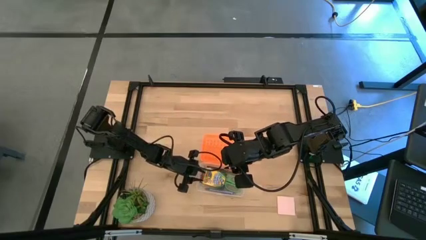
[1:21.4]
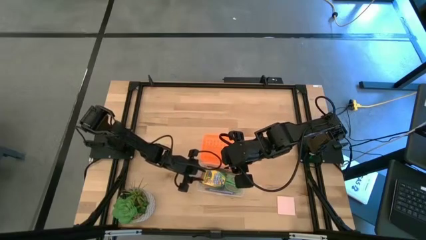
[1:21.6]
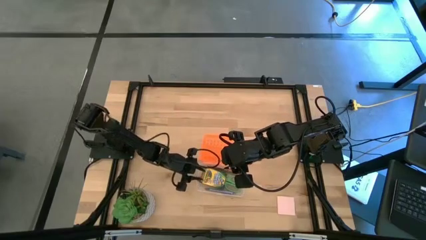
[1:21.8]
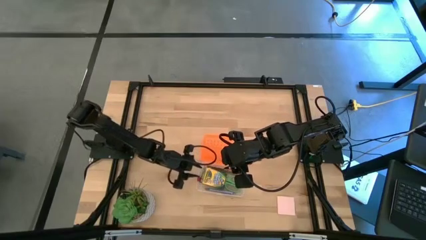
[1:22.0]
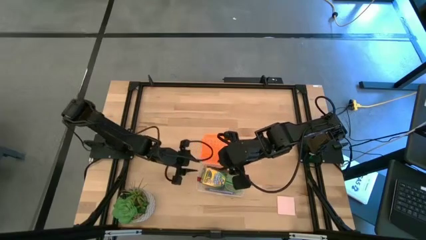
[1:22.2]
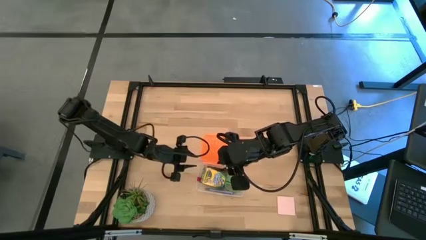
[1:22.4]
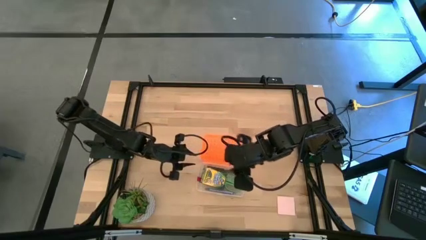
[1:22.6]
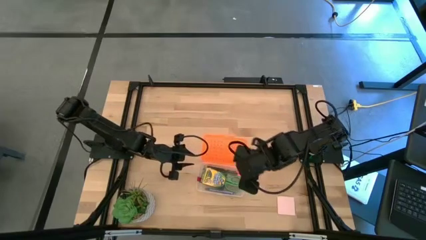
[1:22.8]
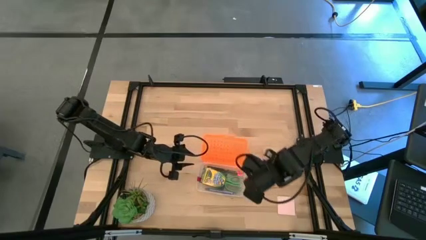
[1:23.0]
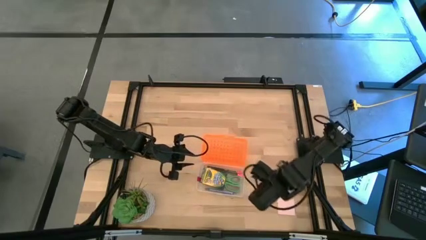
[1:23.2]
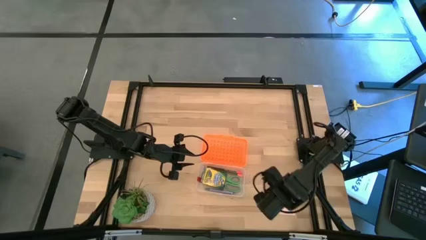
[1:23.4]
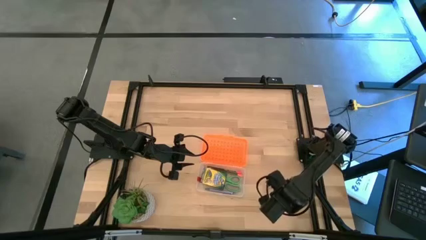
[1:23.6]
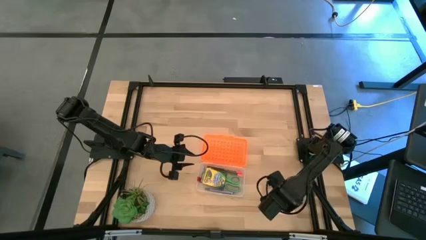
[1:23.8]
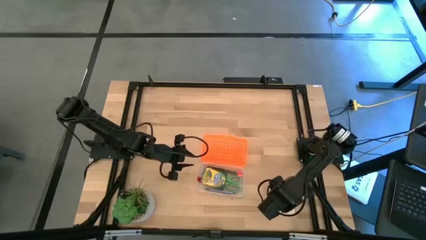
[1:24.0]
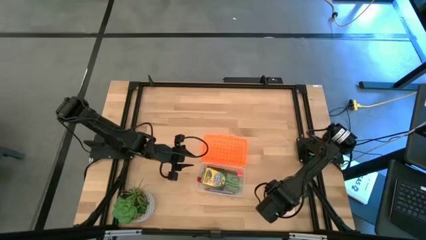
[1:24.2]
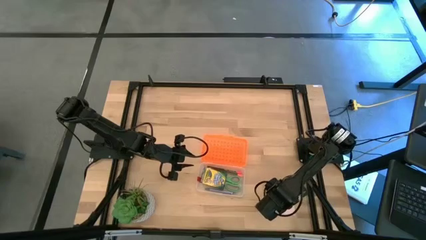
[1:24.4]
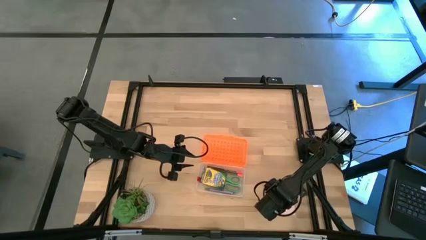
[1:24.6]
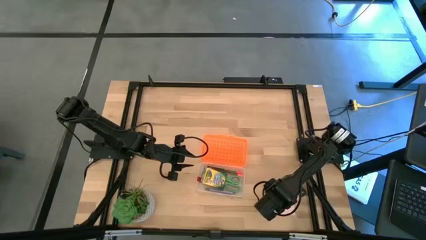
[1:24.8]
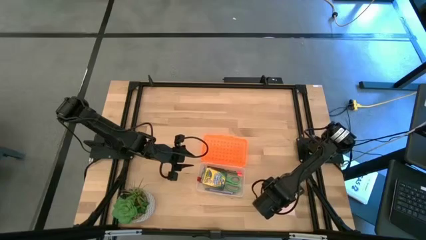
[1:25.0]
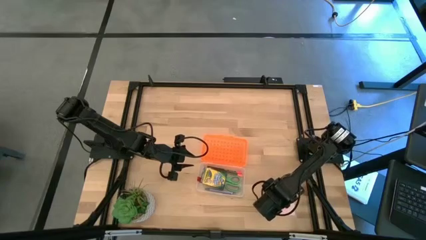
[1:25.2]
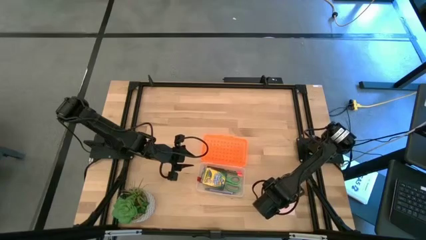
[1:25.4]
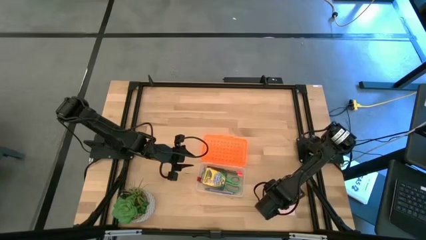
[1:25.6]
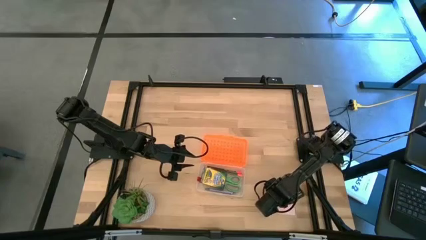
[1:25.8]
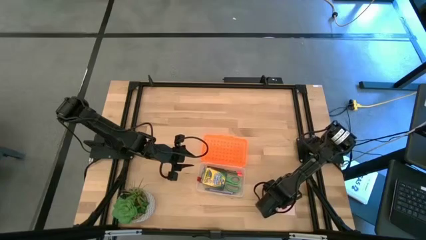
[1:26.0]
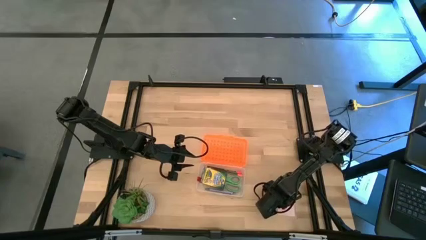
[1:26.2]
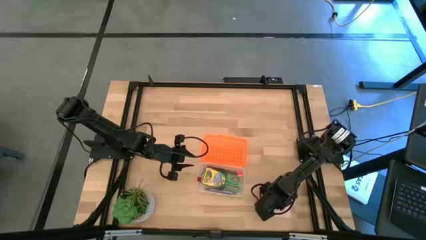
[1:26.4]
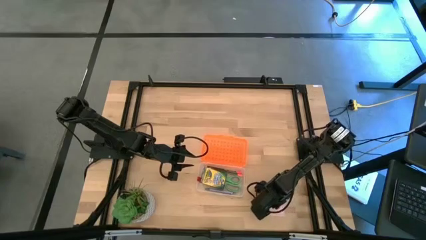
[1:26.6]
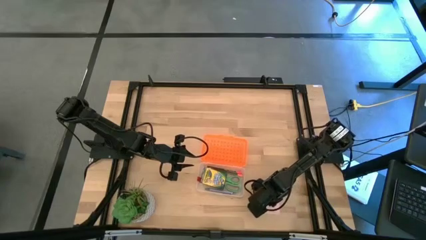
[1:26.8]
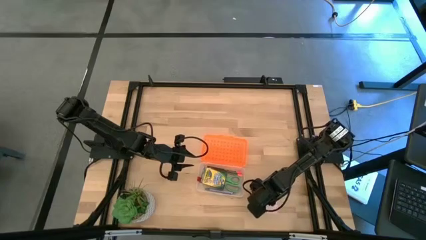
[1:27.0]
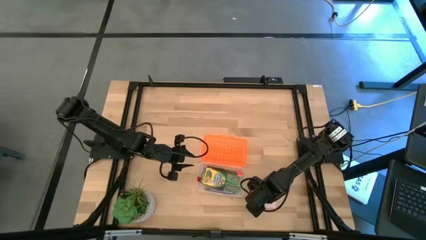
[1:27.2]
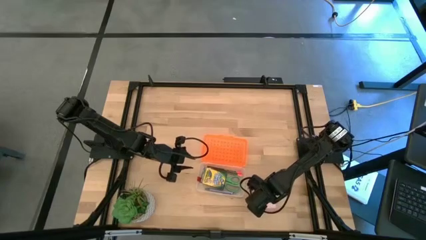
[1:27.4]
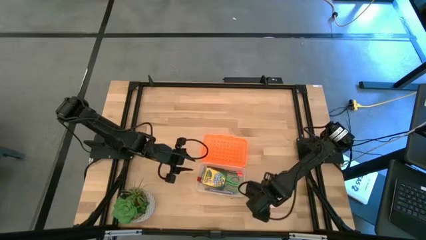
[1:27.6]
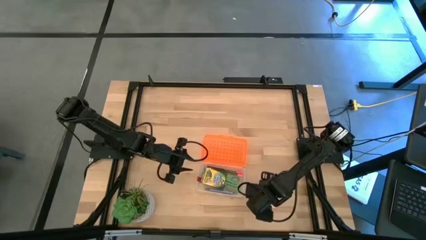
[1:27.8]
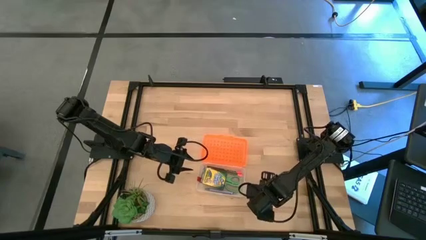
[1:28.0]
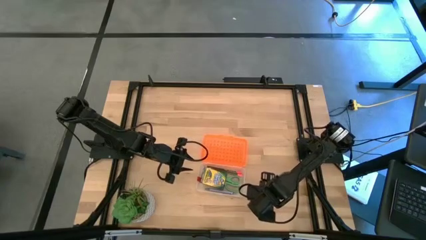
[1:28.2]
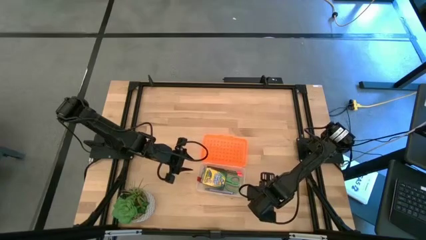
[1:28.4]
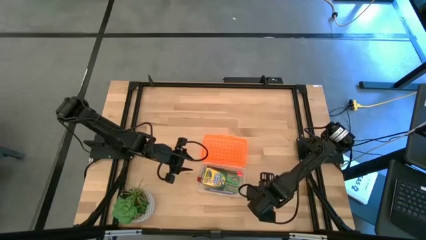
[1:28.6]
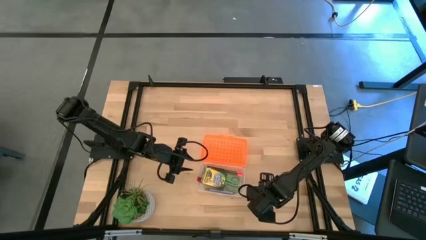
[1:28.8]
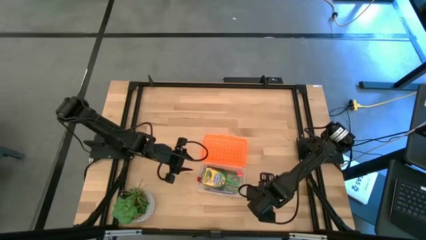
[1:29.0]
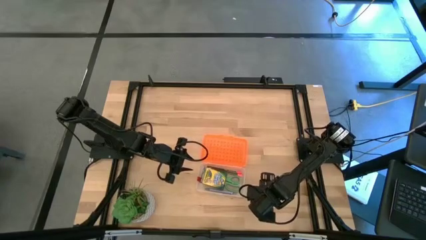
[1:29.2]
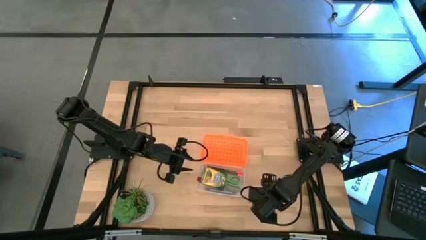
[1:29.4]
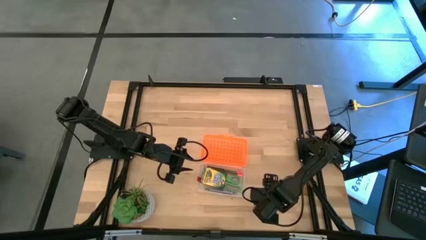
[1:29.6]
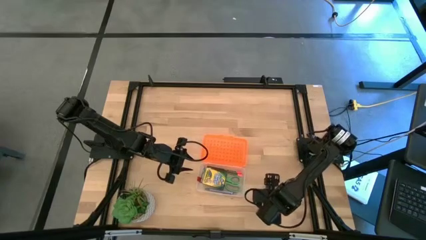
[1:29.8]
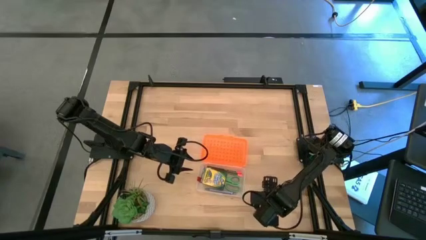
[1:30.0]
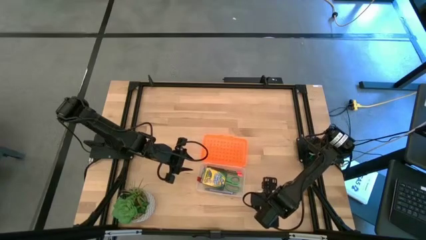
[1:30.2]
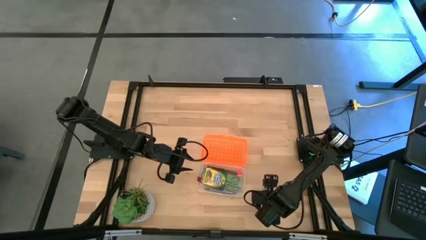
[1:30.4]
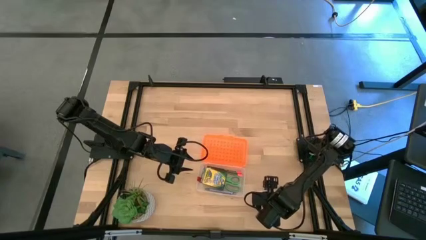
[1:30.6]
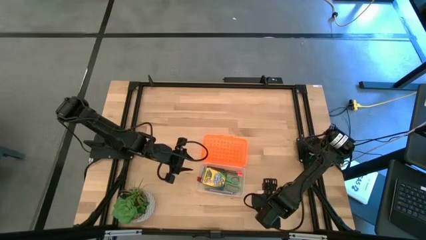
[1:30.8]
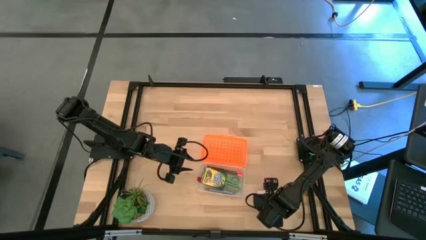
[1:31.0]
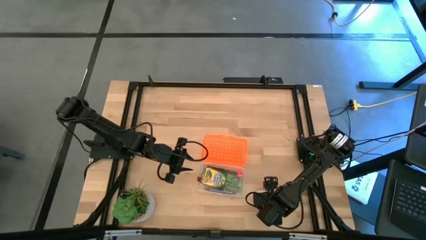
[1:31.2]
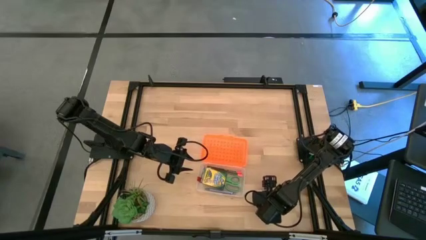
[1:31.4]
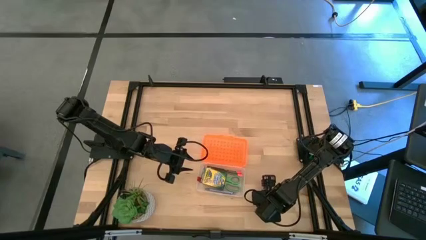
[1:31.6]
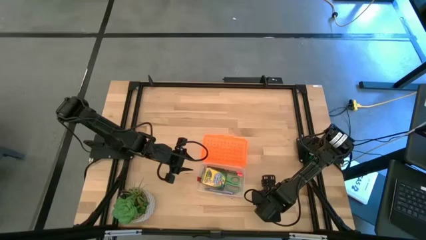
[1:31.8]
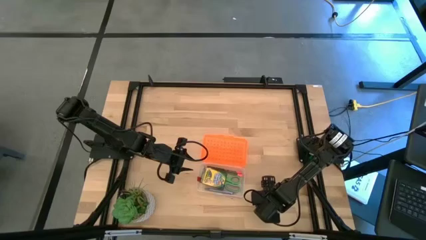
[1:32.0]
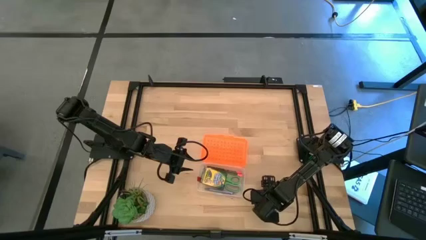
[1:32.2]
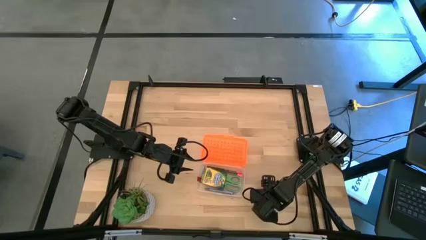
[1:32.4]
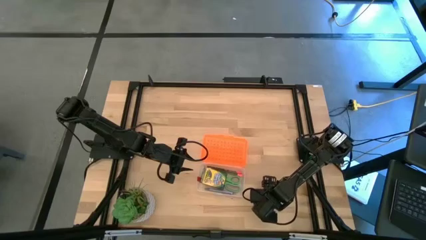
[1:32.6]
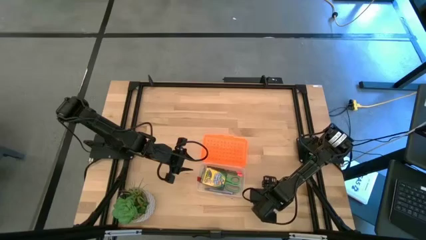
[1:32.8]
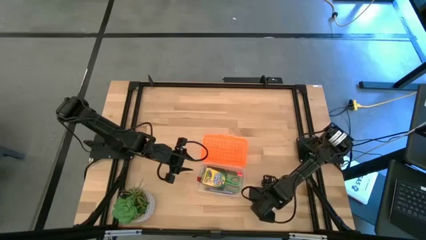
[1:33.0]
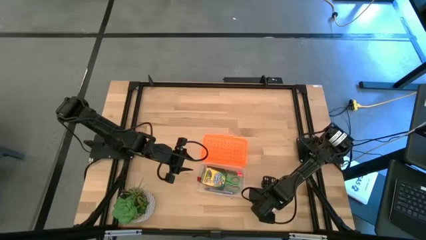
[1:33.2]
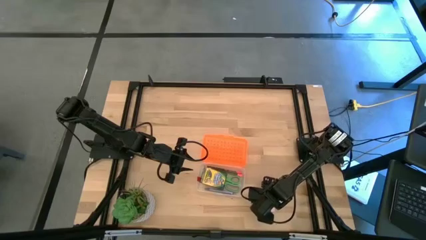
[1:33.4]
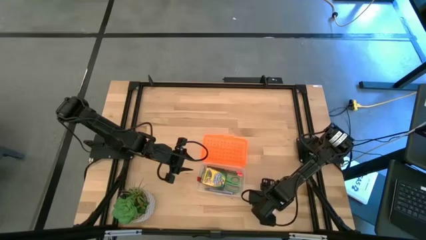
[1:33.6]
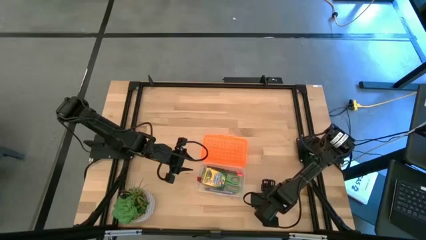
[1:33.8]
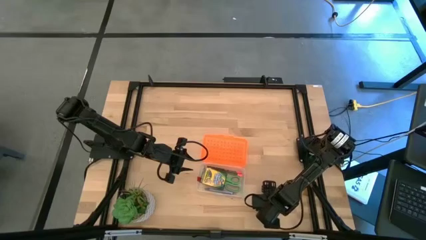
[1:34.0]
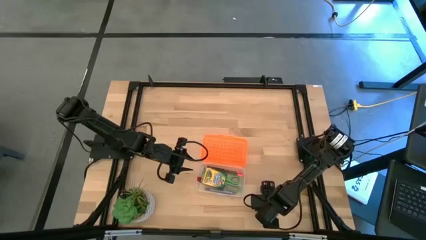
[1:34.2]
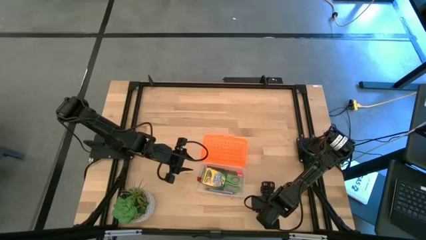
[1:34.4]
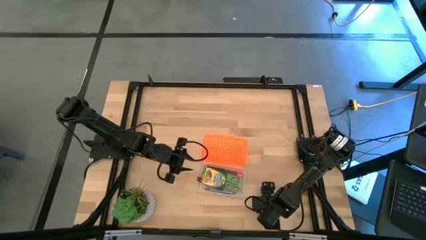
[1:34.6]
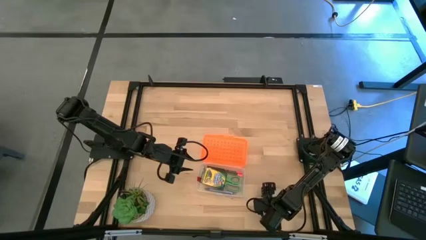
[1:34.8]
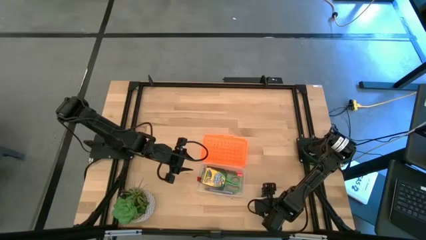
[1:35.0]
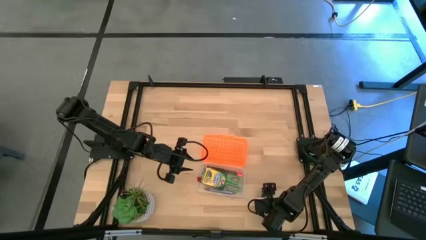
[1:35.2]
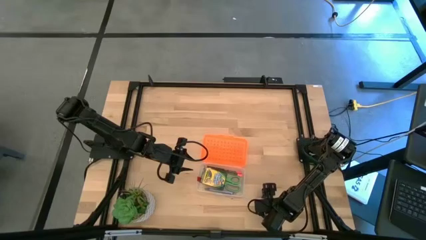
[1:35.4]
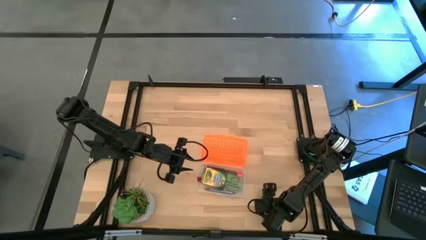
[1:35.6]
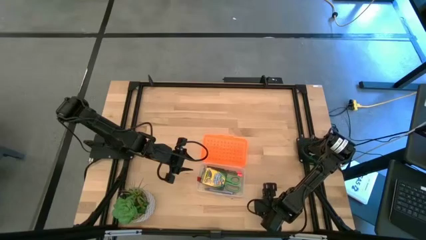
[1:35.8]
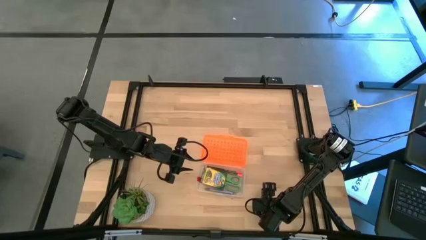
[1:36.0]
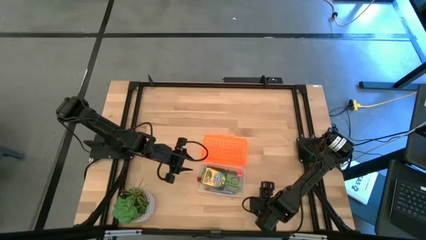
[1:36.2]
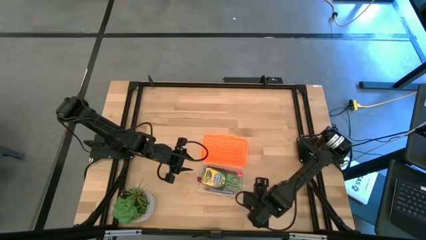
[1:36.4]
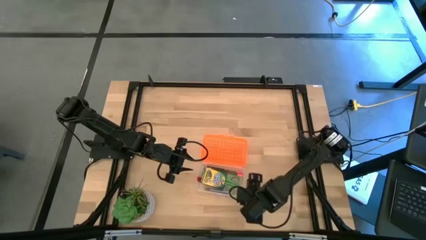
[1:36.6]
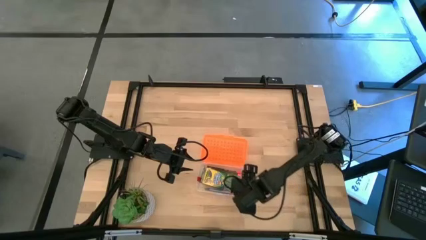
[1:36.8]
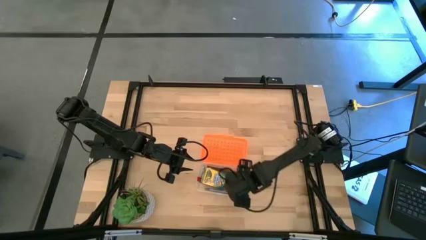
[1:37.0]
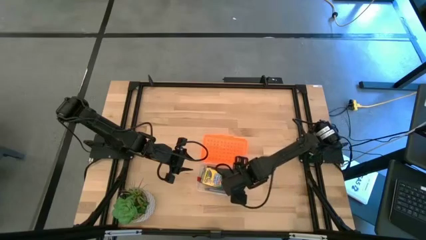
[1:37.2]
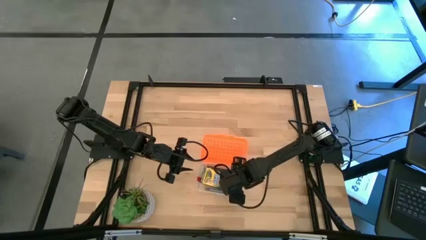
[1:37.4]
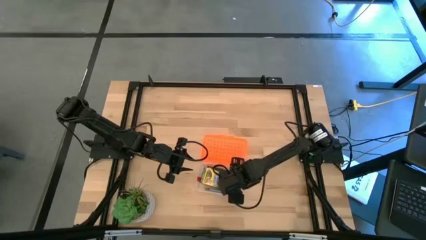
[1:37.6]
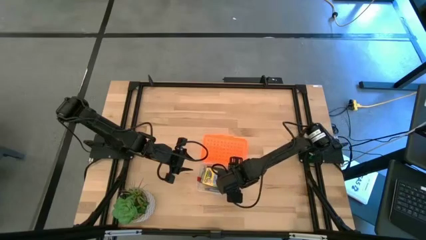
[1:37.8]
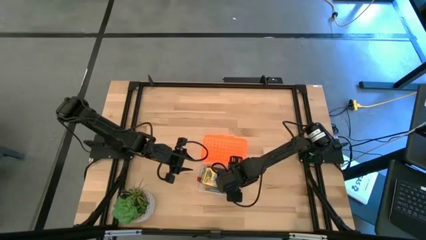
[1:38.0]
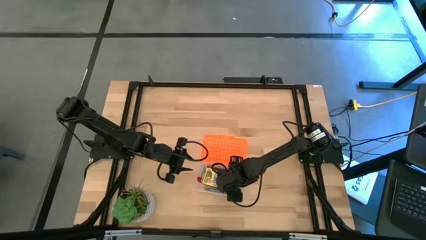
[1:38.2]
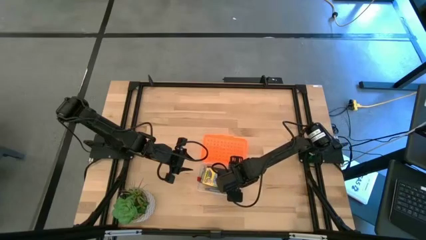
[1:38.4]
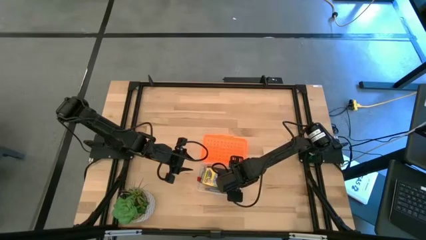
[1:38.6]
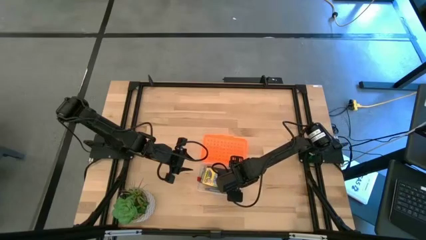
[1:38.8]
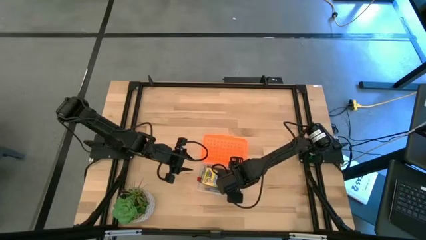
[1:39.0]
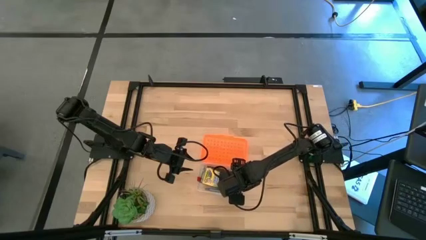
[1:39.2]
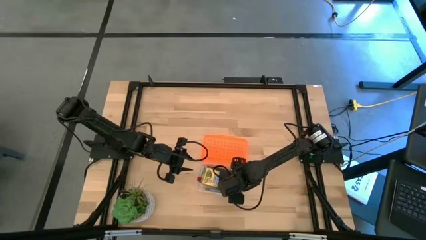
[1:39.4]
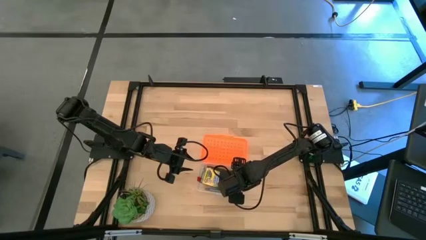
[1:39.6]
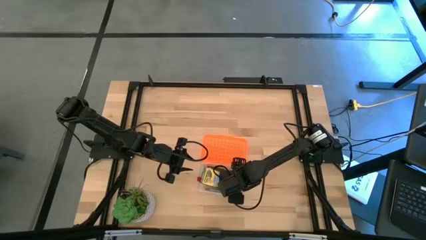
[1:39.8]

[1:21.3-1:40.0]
Task: Pack school essentials
Put the pink sticky note into the orange supply box
